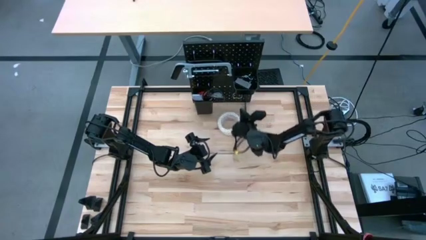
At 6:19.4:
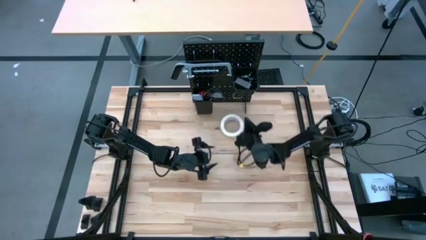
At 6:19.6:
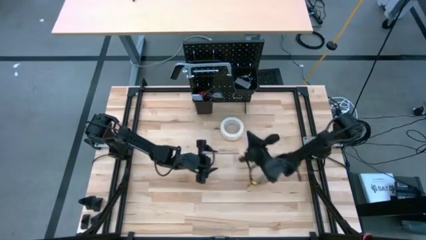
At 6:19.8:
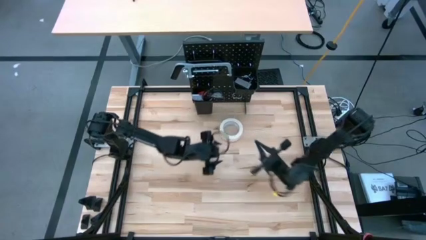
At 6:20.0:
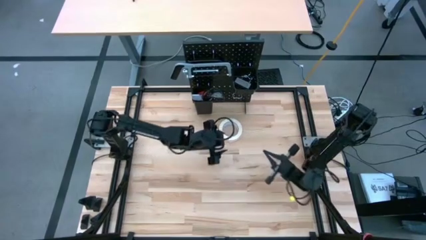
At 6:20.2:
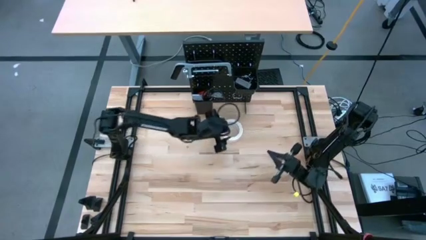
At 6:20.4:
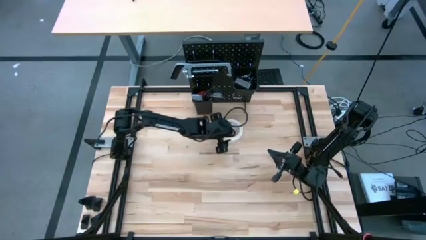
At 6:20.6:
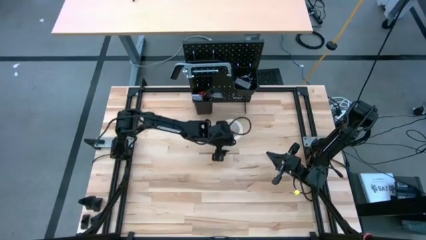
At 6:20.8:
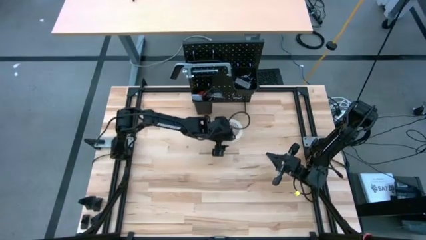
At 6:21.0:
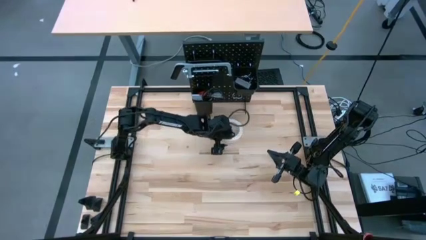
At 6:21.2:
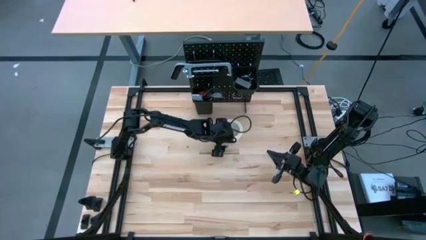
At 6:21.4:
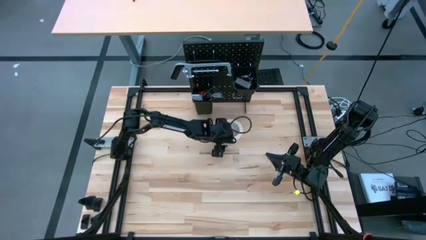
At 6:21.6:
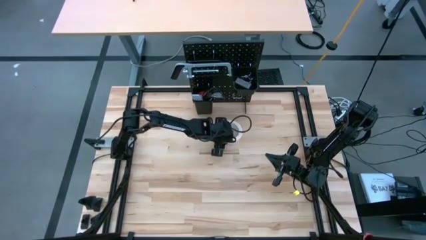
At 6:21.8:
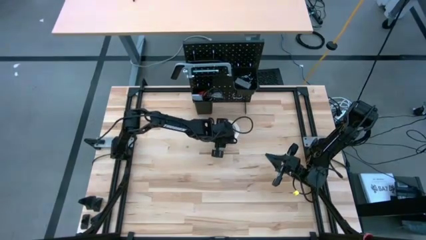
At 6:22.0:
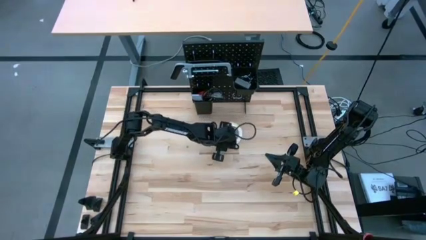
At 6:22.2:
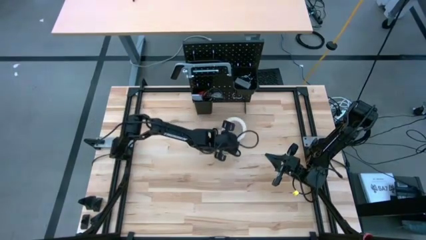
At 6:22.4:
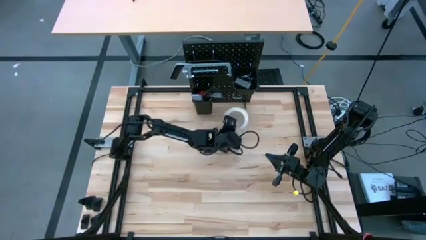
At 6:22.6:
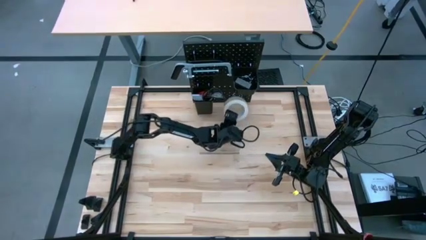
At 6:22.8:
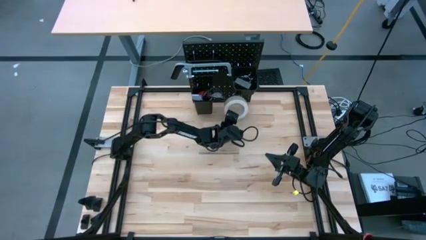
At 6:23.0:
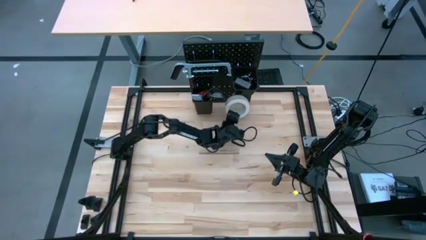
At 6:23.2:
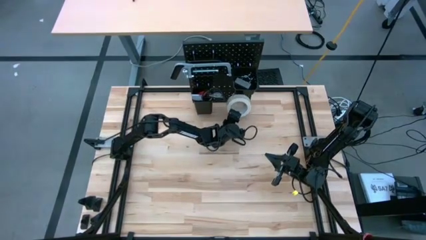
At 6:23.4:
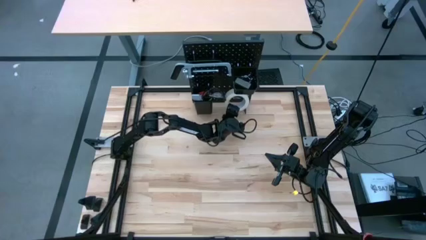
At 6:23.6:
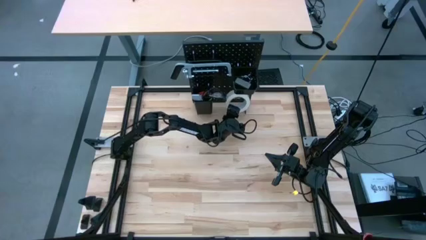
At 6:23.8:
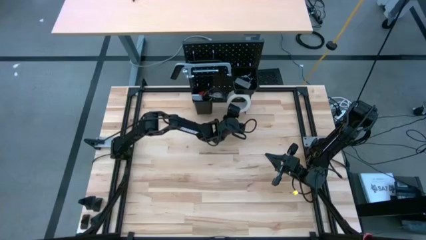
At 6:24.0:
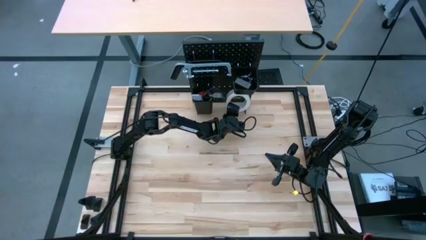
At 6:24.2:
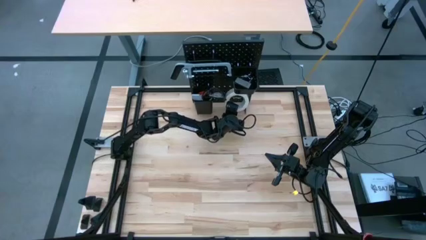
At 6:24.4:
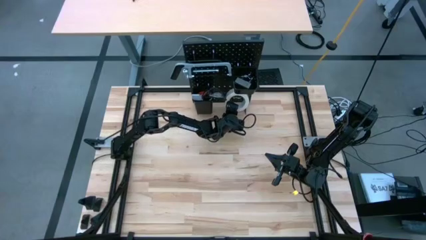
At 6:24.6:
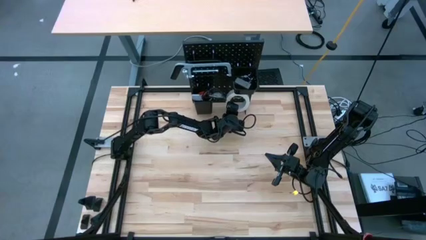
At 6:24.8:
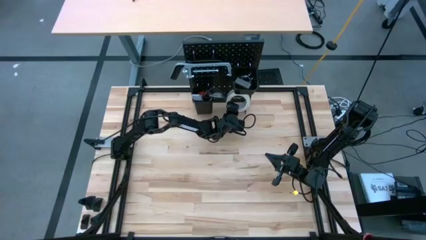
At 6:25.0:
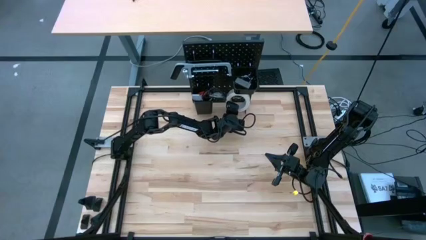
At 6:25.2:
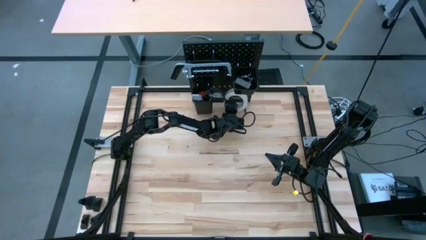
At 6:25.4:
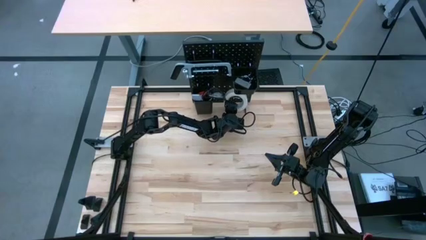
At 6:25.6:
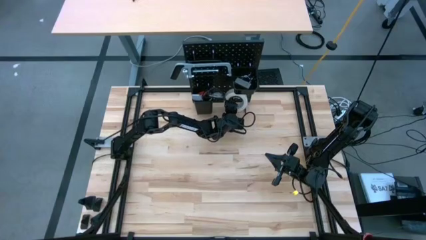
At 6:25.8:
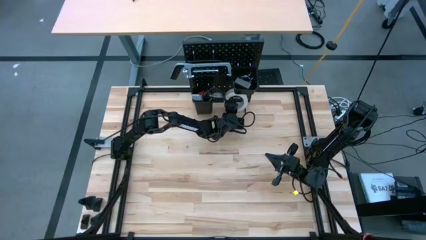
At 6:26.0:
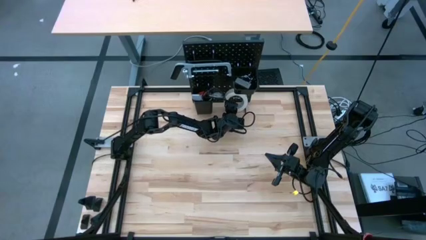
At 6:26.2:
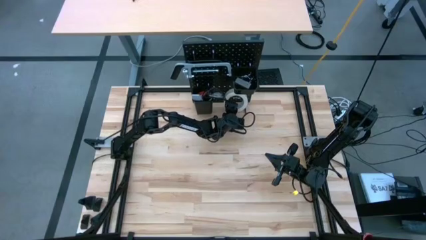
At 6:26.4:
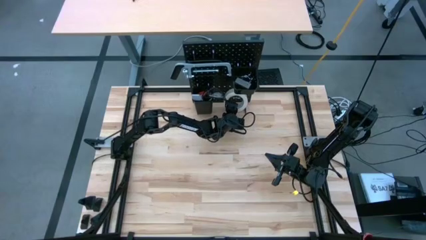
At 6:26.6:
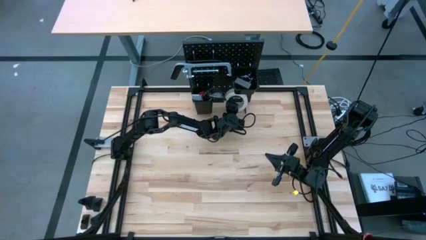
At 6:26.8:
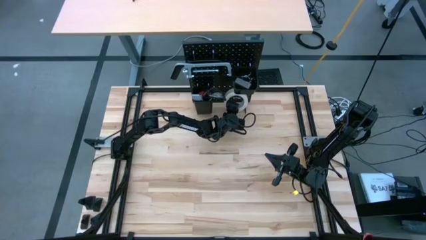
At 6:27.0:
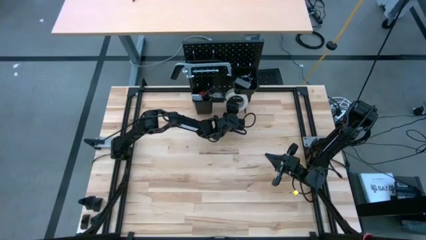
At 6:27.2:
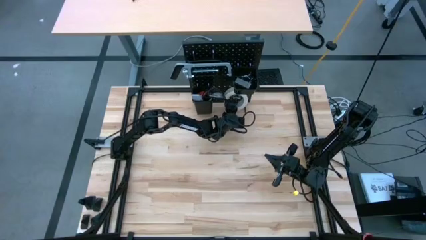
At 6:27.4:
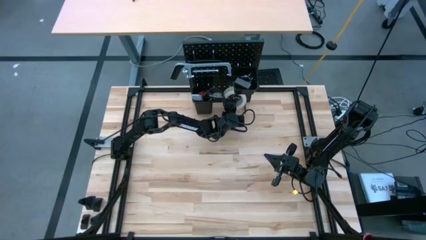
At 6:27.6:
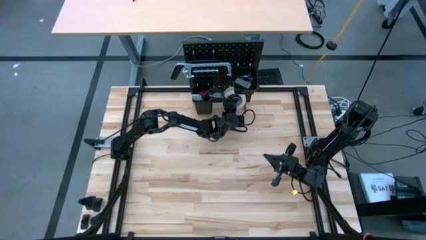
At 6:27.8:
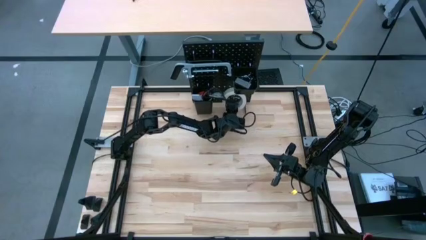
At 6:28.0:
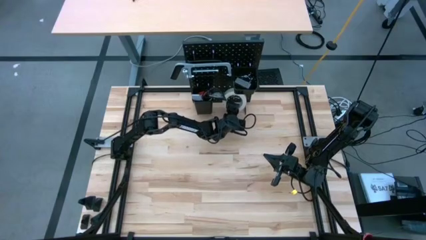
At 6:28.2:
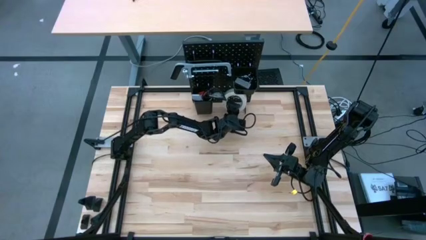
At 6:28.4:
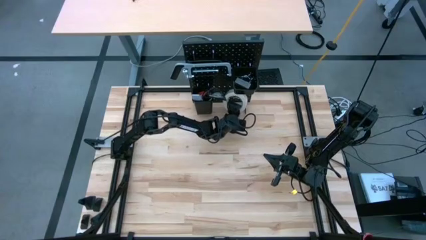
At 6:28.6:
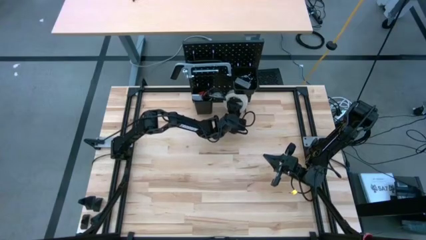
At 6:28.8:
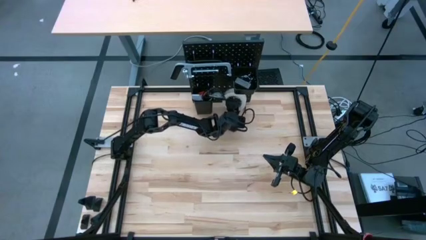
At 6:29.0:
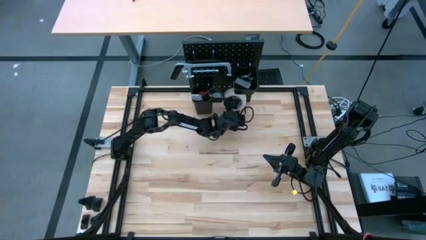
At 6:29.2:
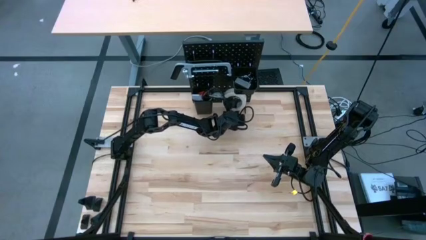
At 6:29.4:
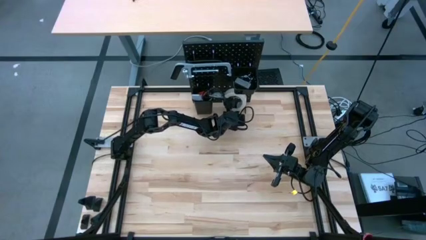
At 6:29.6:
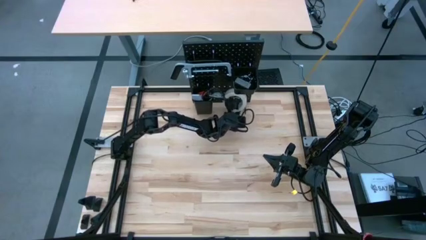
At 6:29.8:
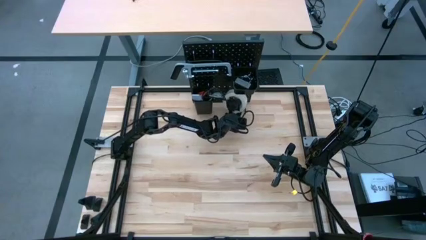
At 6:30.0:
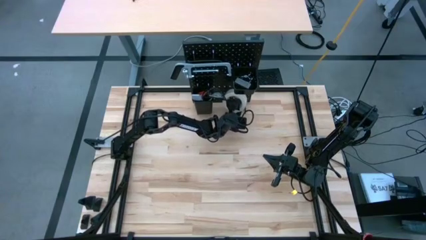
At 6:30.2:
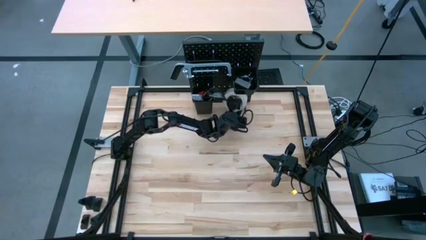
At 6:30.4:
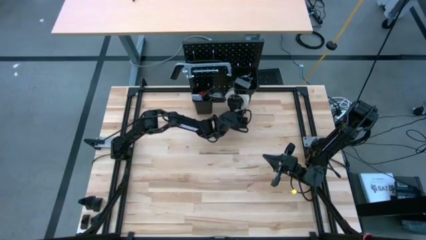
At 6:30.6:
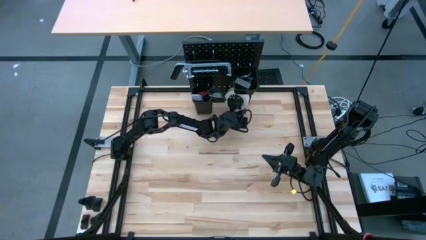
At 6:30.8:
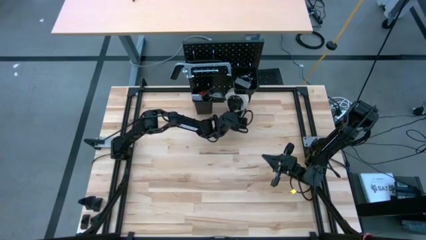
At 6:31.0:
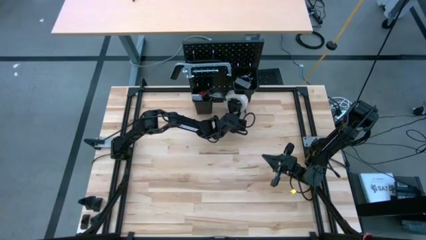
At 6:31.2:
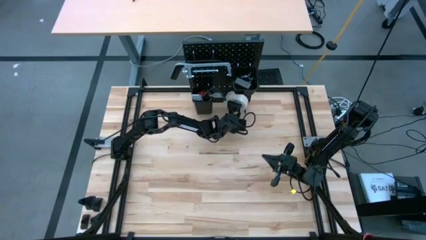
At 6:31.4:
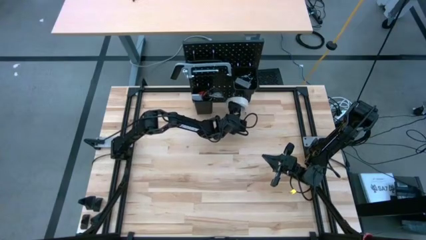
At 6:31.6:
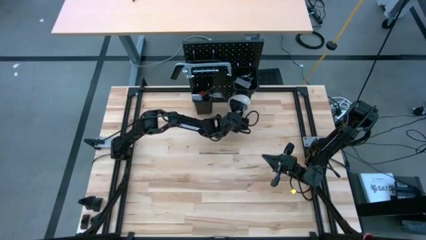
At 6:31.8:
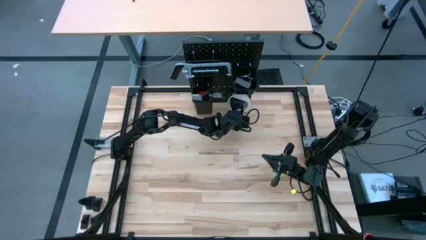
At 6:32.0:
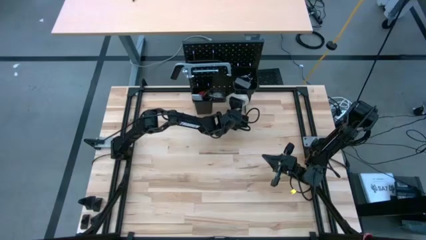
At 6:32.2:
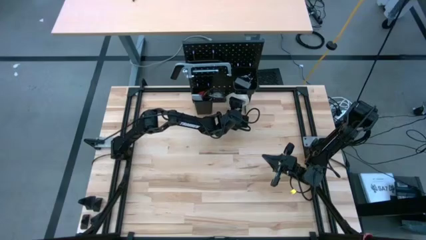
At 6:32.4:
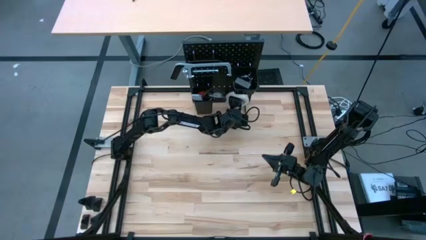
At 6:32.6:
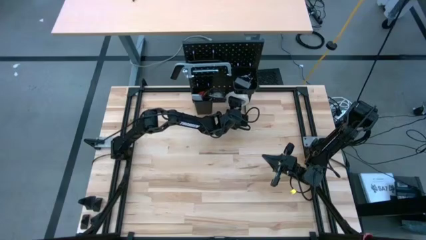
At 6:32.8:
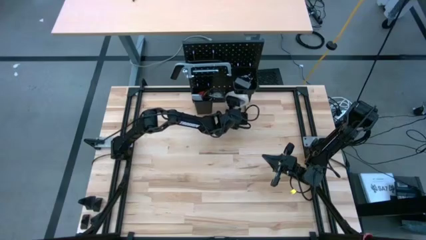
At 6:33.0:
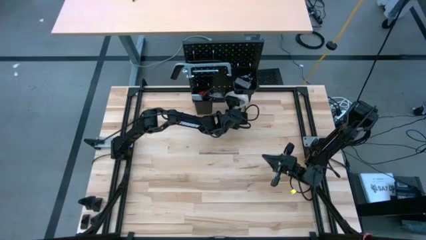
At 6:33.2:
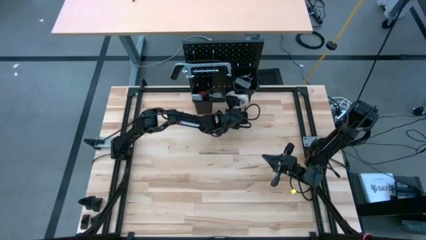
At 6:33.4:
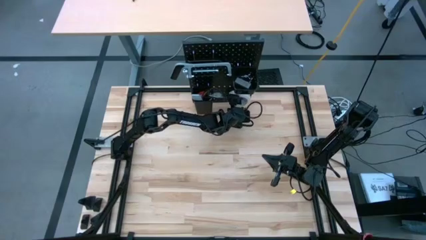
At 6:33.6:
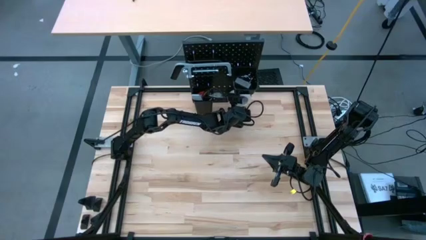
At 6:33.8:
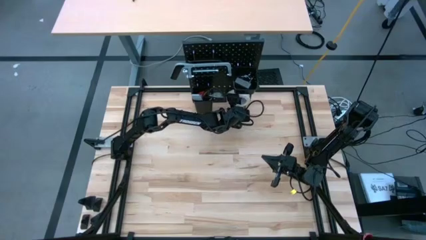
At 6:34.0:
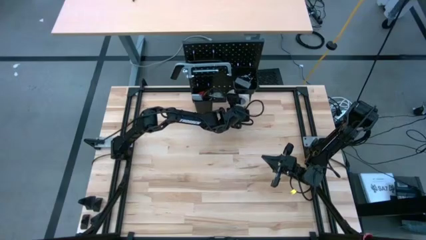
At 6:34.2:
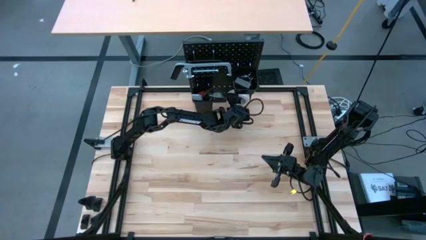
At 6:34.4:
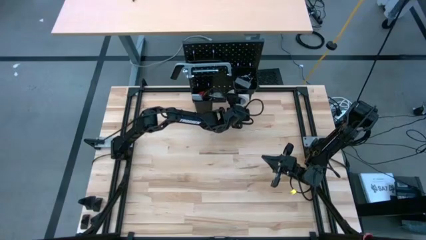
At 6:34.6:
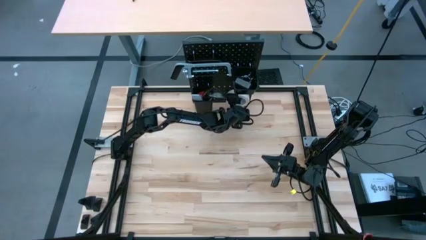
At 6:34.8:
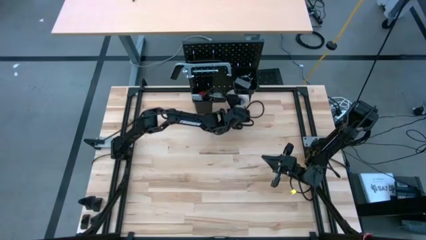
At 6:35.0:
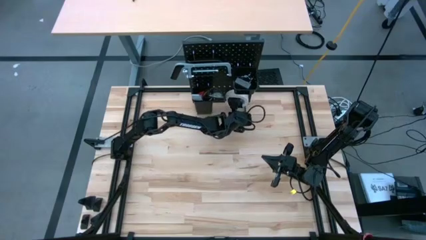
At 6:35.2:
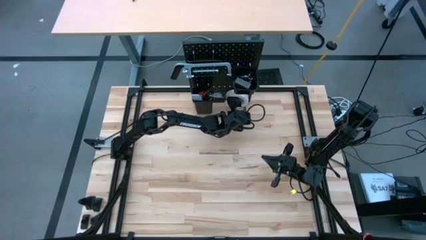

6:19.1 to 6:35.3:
Task: Hang tools onto peg board
Hang the white tape on the black peg board

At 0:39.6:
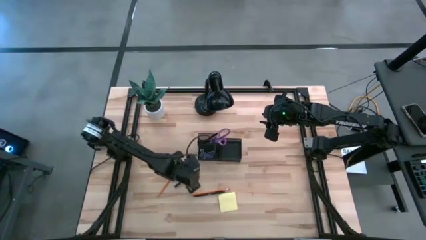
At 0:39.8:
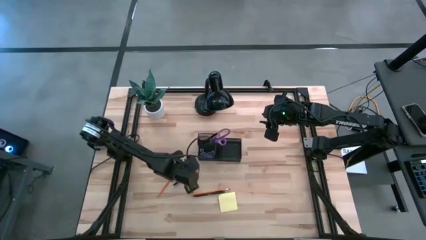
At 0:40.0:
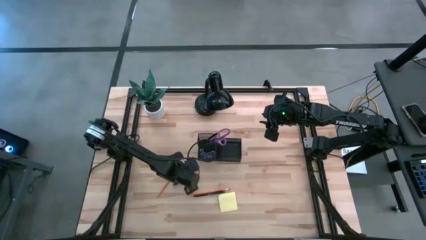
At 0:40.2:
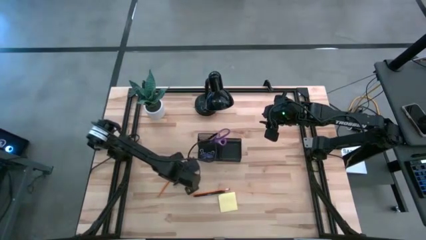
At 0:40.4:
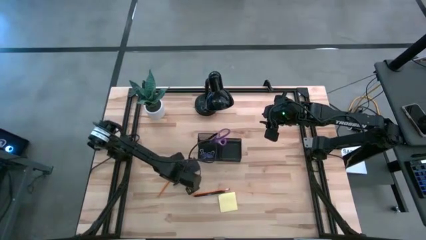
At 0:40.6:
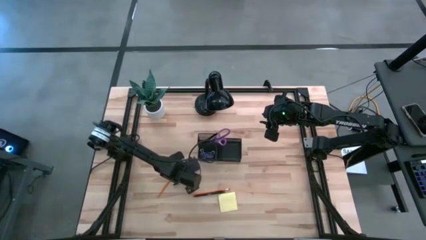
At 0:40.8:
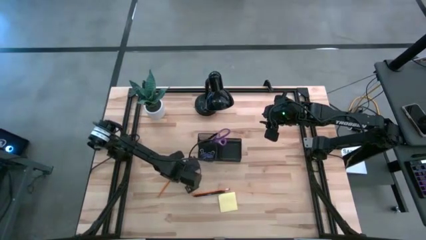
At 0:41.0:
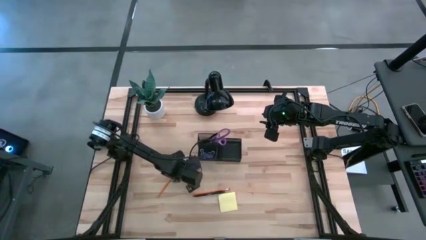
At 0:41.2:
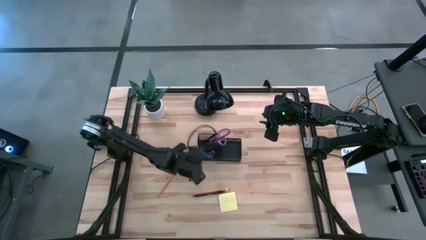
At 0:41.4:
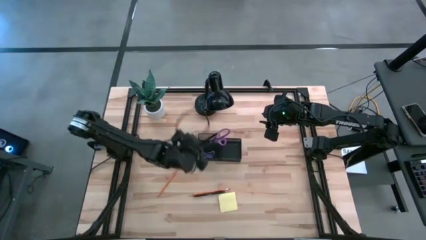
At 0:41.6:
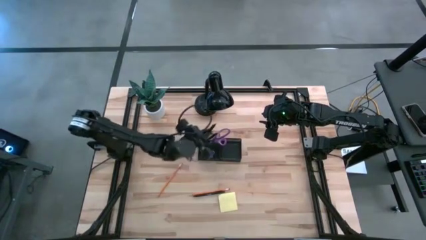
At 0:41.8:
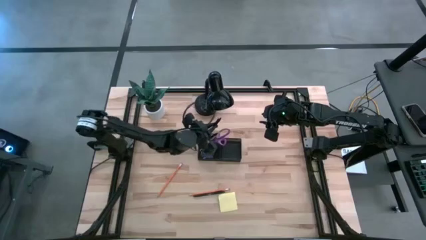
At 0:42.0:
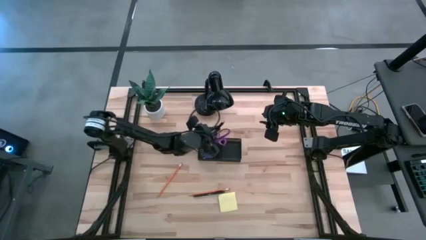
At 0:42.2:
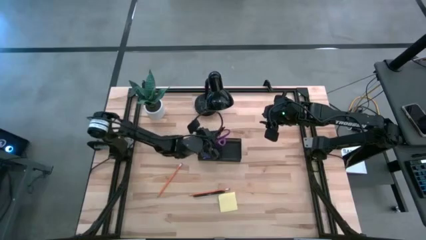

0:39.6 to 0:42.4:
Task: Pick and place office supplies into organizer
Put the top black pen into the black desk organizer
